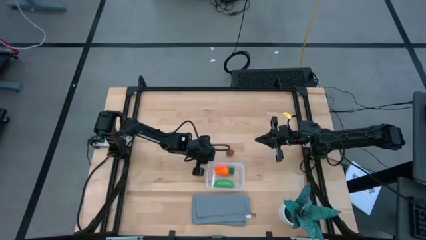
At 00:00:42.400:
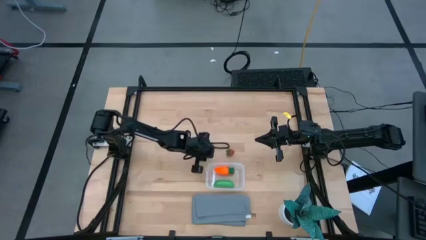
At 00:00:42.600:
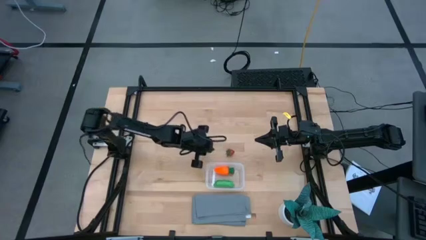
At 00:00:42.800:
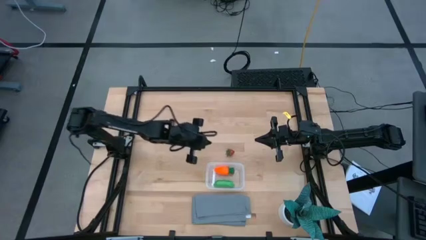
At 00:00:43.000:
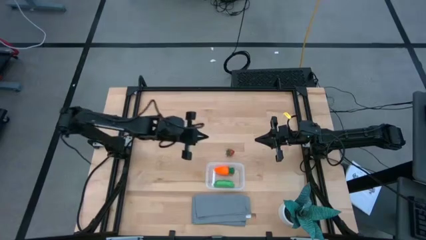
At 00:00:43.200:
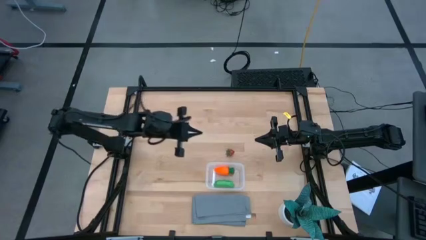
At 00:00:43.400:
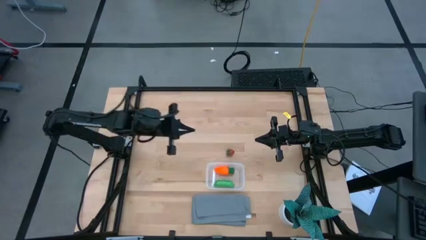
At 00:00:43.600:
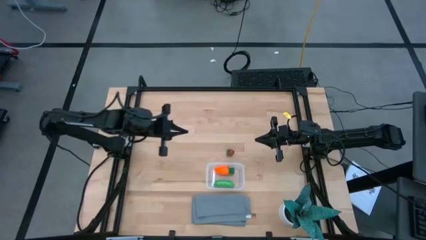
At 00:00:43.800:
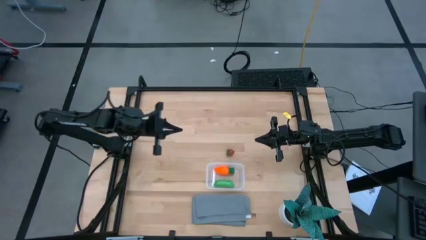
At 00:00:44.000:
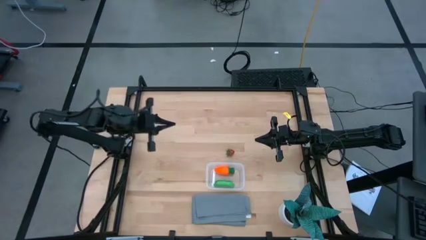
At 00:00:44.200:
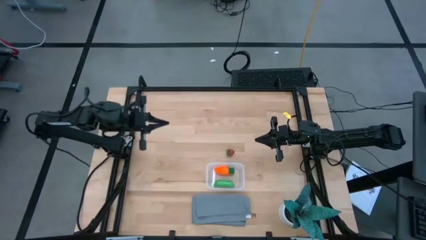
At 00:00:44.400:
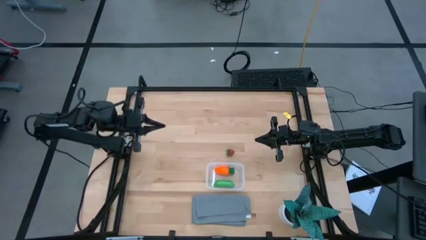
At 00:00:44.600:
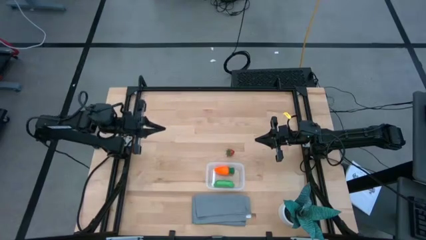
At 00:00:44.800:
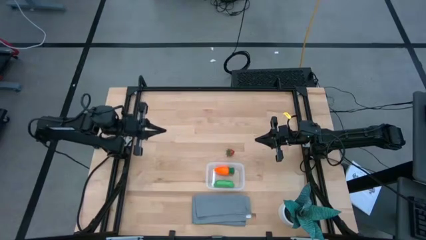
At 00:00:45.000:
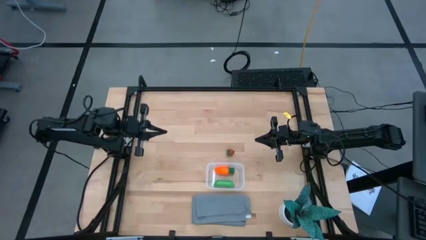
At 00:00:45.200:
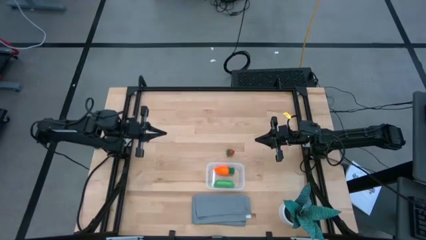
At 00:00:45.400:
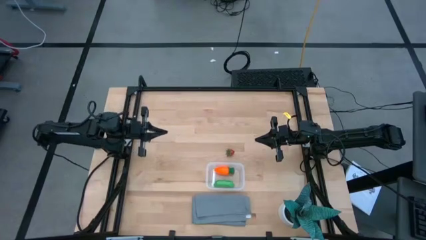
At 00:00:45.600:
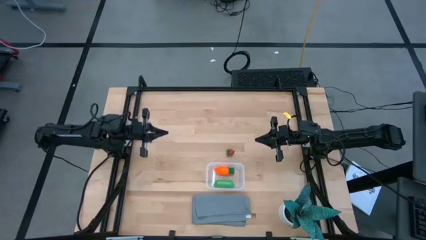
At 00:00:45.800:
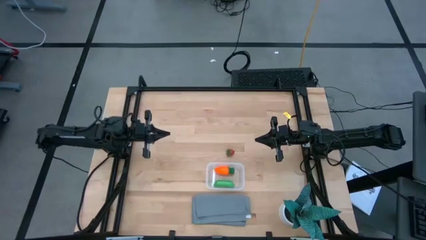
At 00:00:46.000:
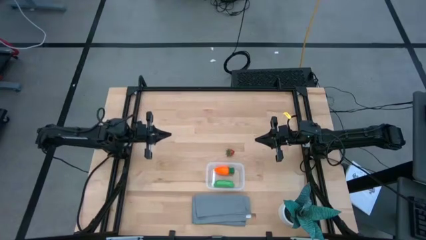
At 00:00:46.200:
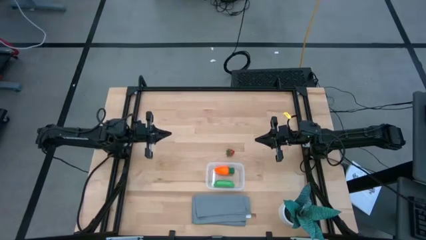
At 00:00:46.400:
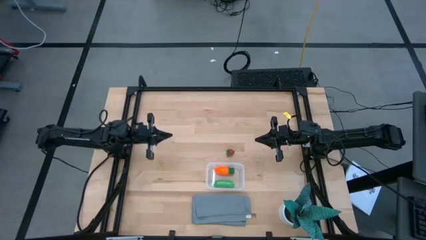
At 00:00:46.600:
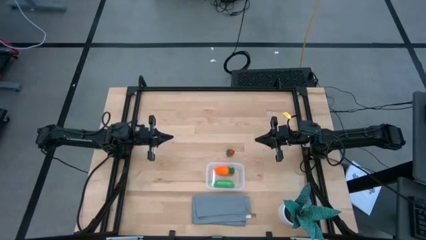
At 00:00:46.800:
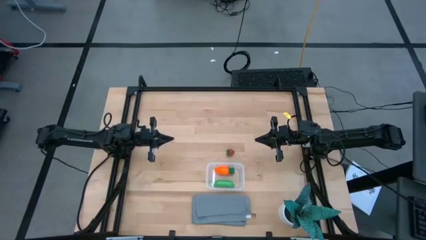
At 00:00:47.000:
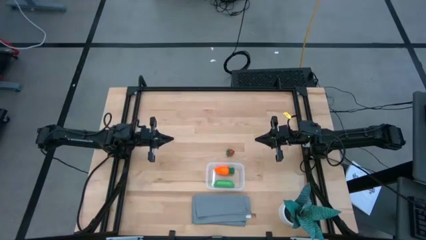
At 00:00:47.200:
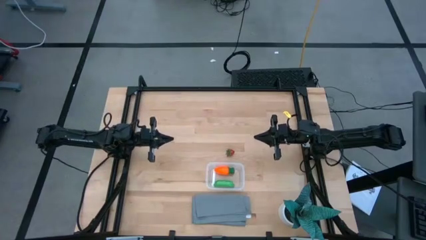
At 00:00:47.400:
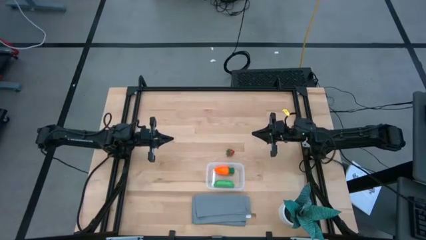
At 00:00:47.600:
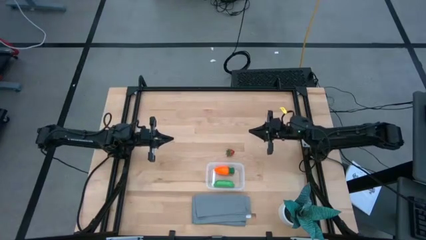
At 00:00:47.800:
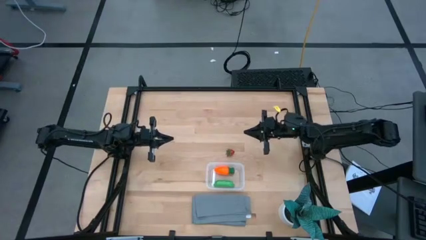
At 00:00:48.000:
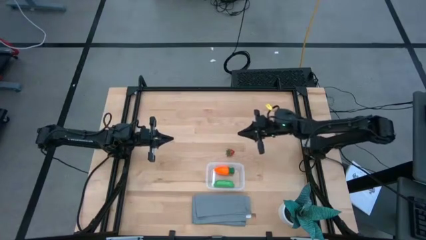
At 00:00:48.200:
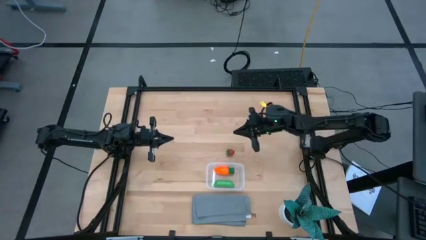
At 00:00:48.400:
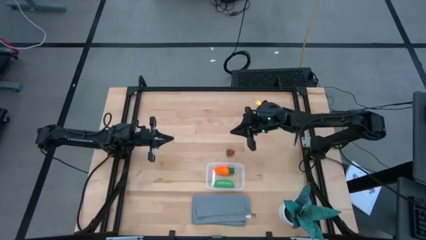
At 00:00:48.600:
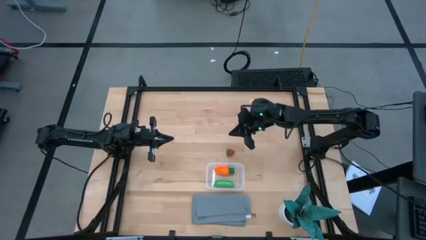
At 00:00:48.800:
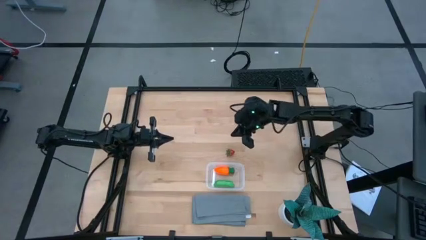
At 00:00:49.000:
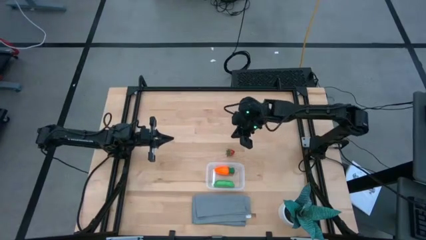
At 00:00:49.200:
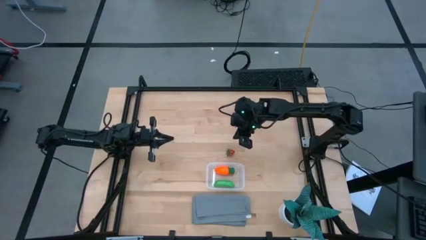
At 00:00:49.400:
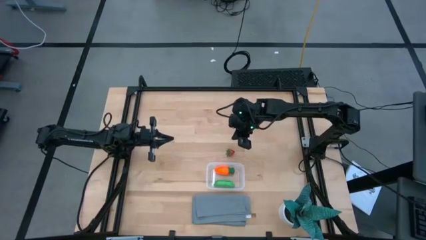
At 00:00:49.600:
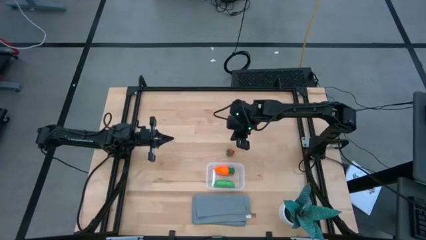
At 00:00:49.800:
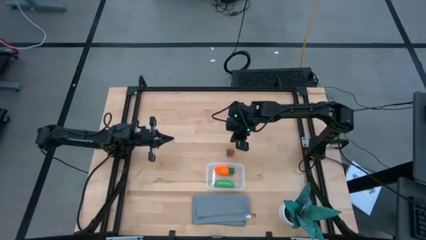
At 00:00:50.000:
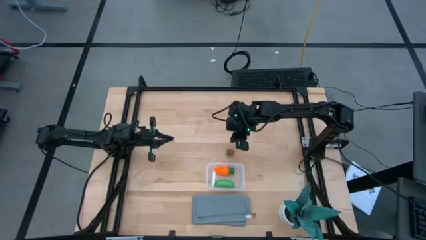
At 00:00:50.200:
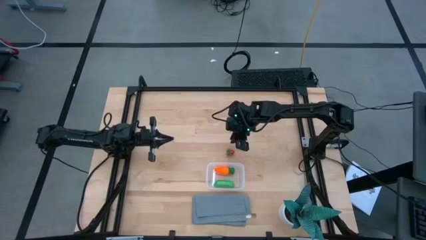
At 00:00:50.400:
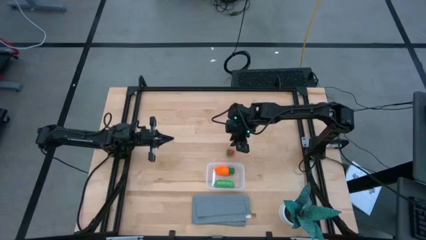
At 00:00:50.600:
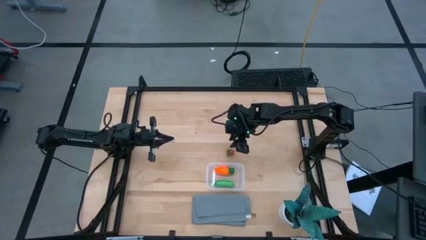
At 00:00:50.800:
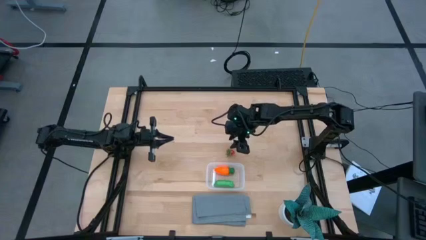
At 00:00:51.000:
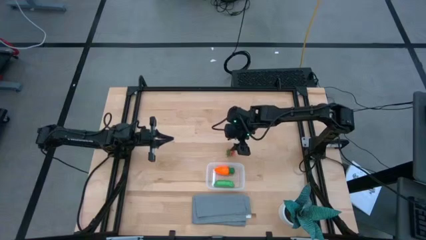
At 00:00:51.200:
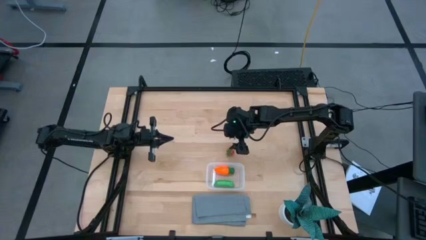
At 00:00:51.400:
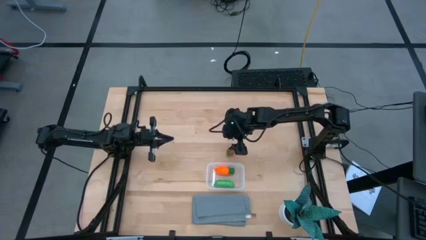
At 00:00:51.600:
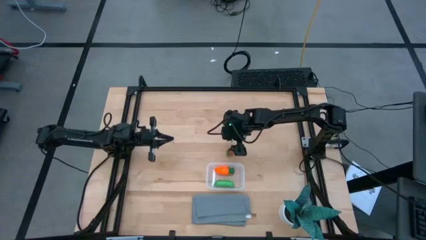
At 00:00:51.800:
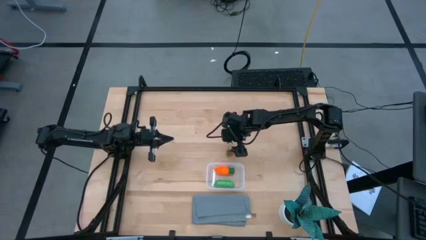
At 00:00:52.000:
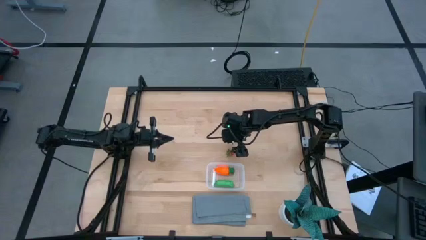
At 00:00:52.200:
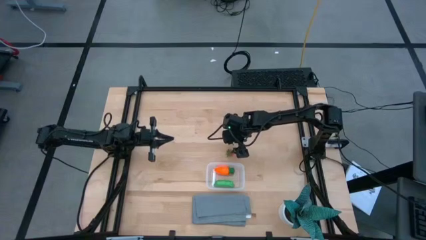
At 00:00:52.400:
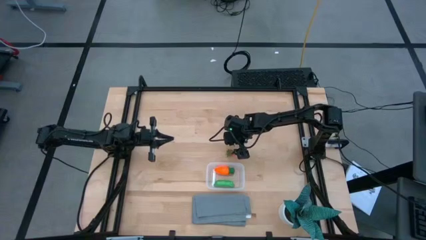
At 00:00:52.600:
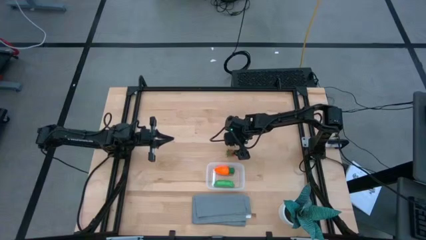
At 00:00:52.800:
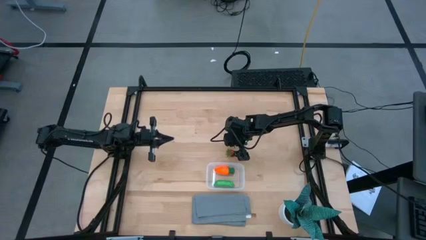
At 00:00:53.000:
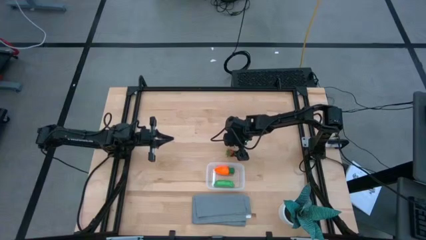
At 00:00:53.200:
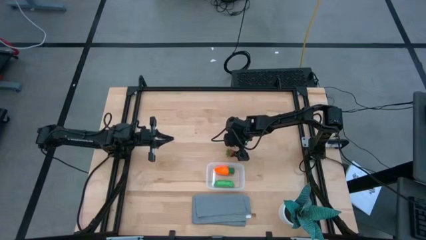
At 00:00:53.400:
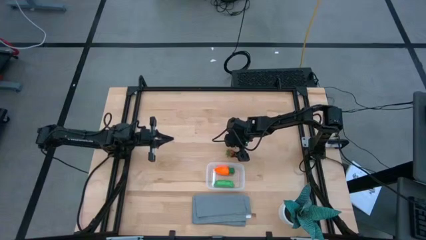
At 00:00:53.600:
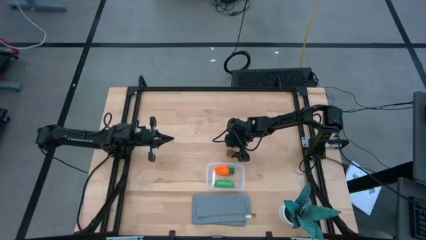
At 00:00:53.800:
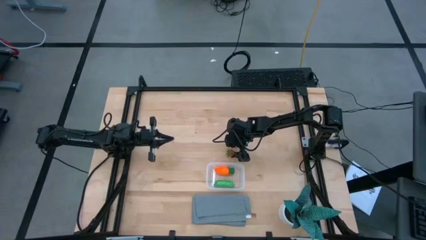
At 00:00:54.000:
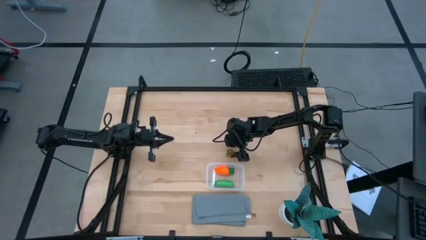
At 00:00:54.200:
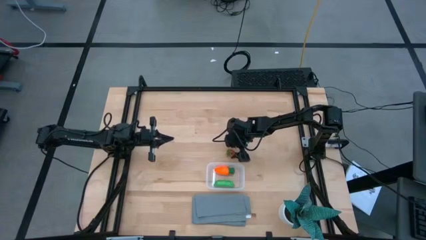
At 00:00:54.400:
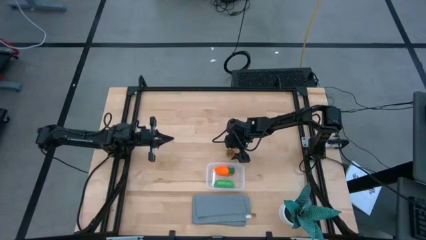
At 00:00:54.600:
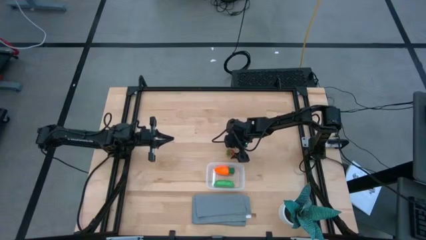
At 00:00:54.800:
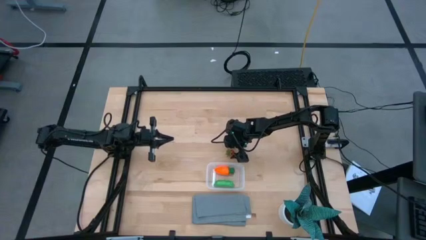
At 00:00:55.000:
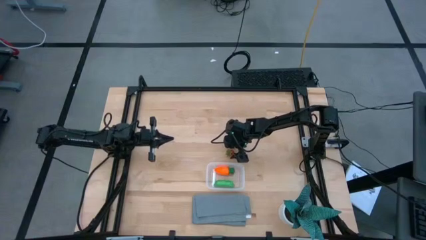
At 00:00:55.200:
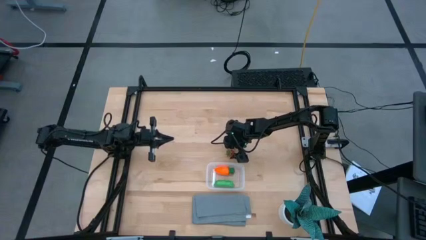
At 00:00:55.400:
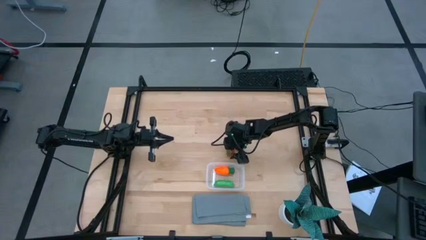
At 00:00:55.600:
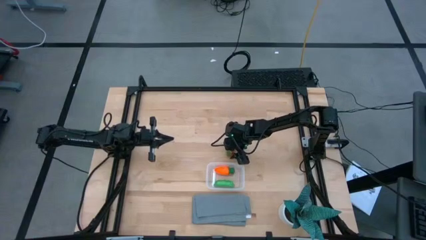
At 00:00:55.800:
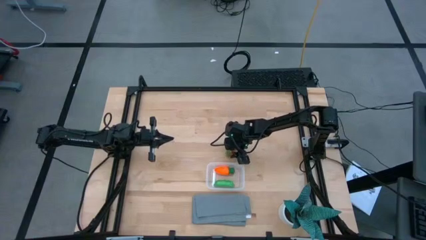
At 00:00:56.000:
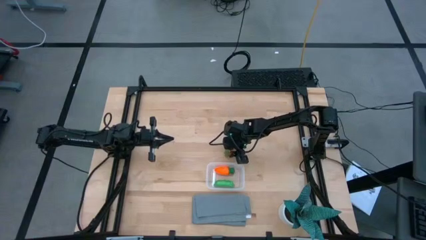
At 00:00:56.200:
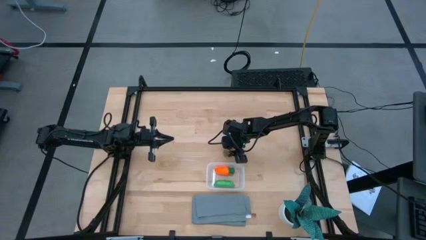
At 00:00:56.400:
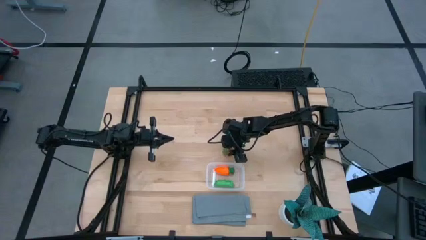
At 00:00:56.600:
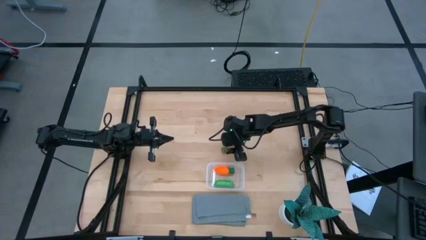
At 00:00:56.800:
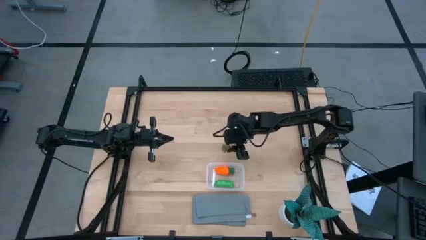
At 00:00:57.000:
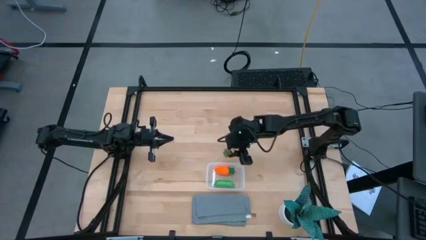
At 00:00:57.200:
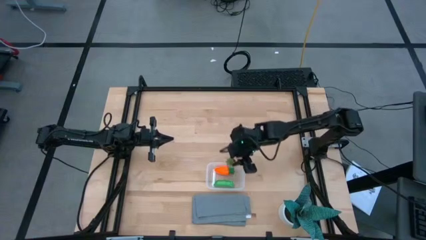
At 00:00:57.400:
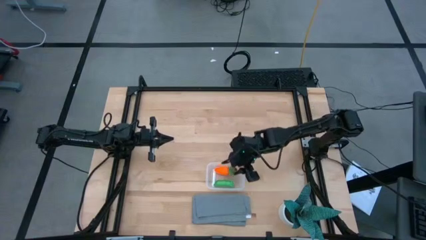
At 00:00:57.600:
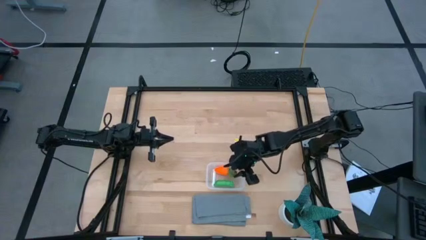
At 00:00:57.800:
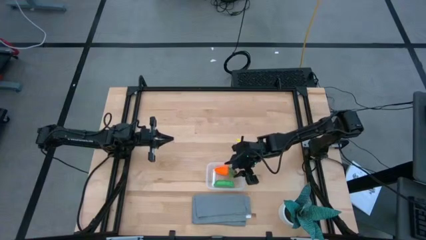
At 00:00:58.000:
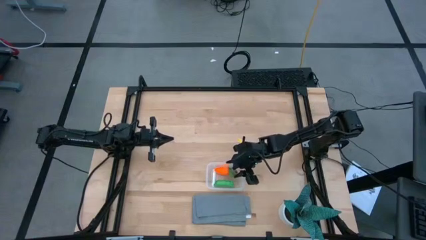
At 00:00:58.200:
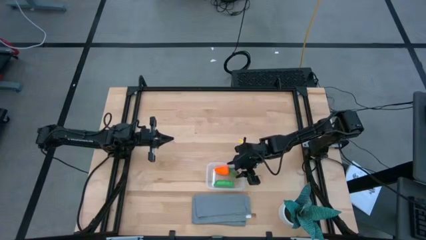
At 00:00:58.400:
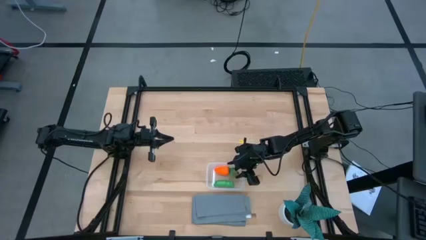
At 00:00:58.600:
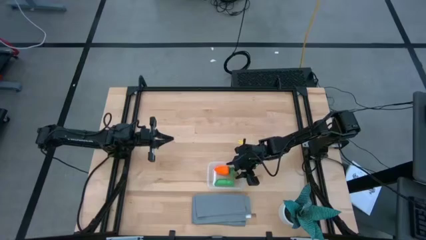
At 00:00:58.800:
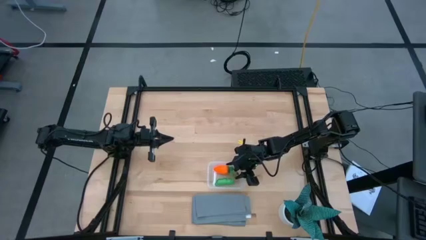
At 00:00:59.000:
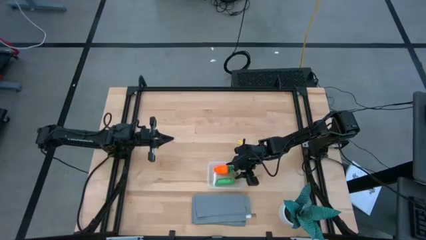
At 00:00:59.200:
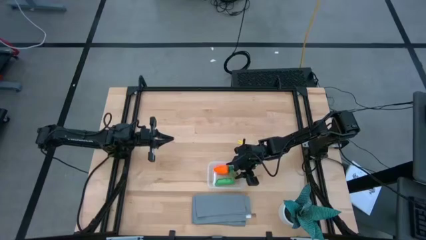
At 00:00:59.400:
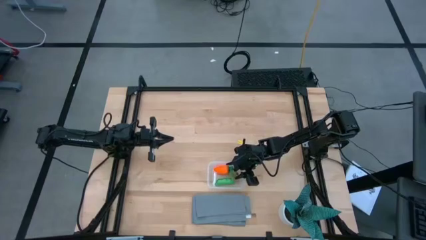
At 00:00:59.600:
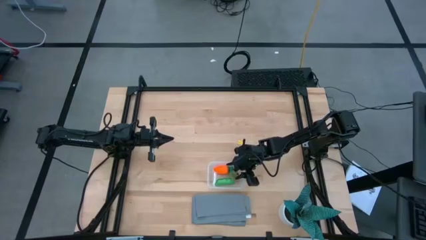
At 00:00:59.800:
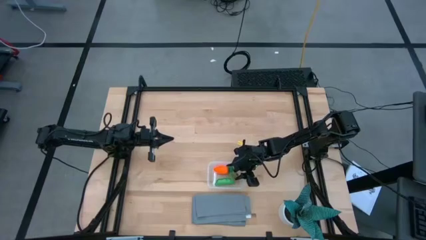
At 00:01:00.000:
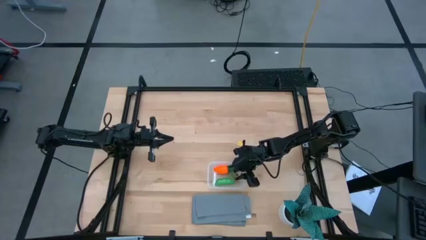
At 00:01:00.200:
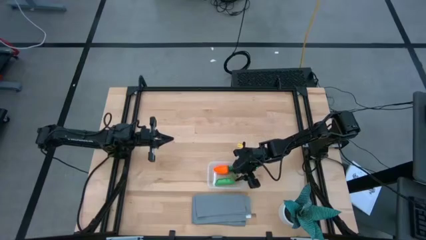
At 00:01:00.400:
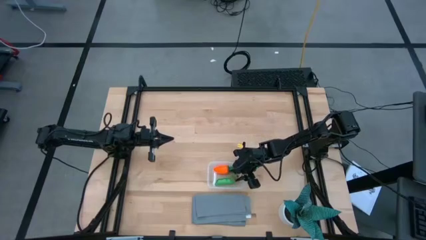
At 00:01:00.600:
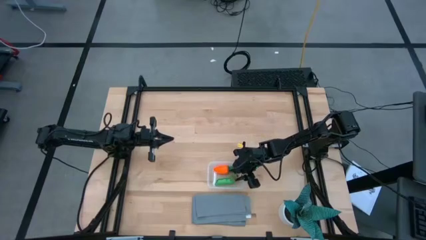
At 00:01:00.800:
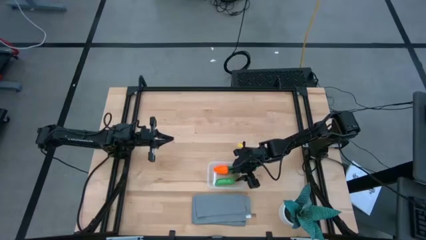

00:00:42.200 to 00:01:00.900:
Task: Pick and placing Produce into tupperware
Put the strawberry into the transparent bin
